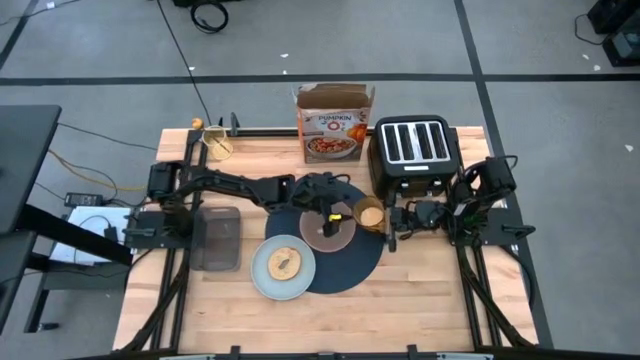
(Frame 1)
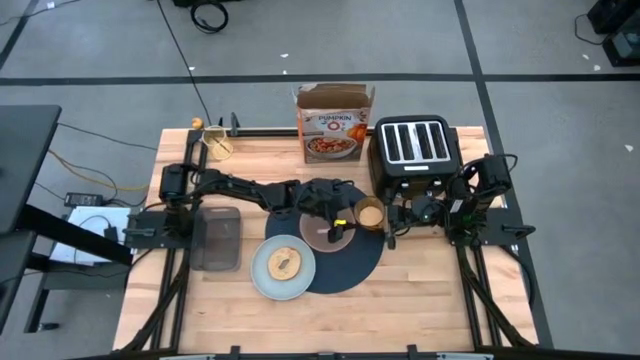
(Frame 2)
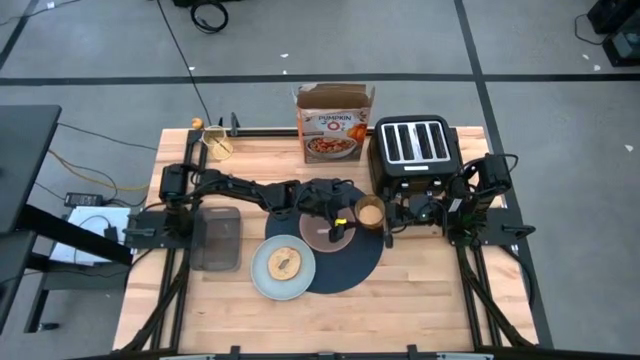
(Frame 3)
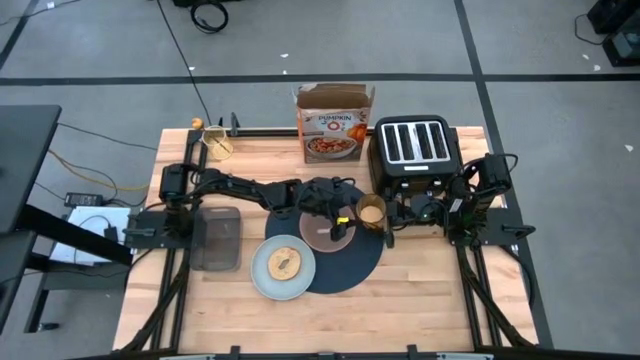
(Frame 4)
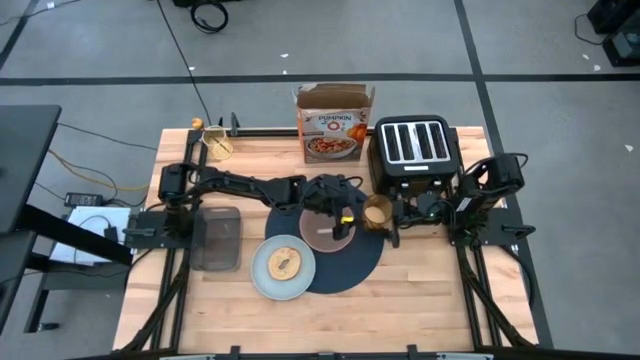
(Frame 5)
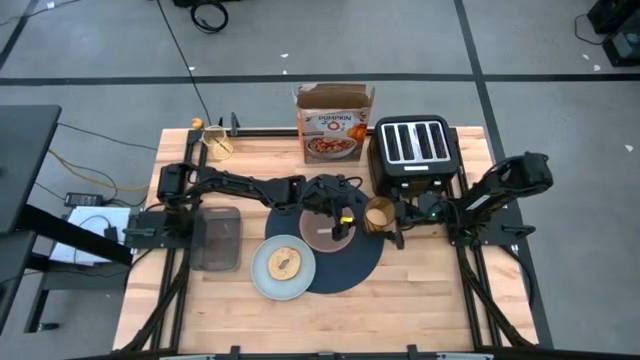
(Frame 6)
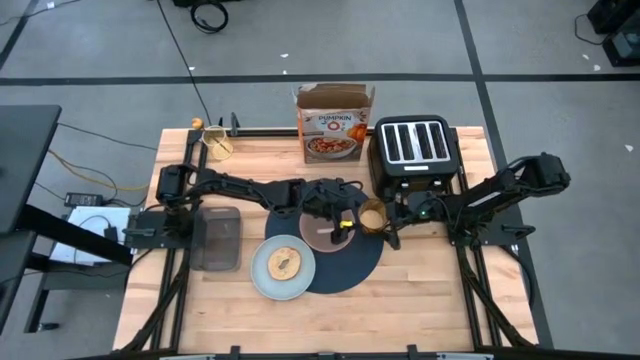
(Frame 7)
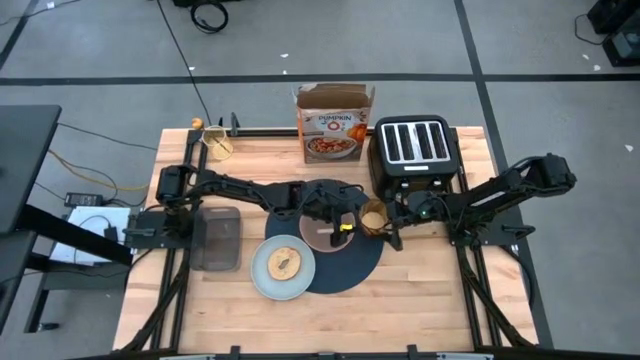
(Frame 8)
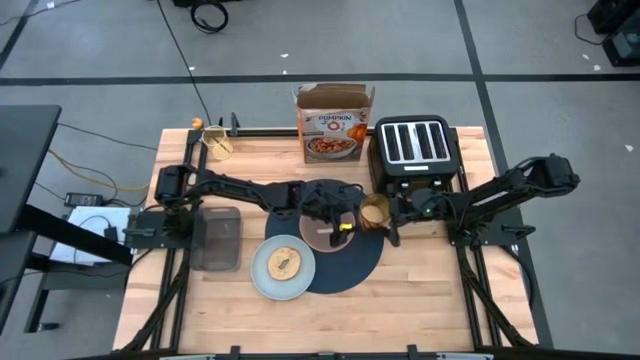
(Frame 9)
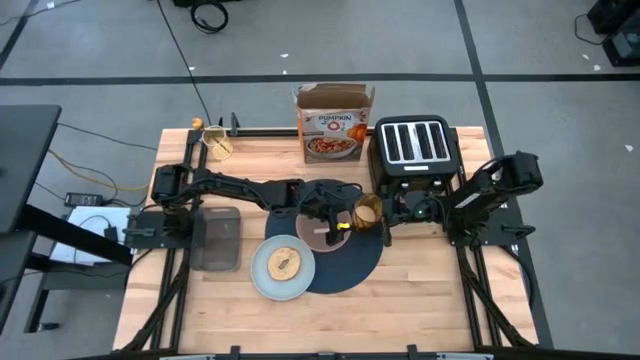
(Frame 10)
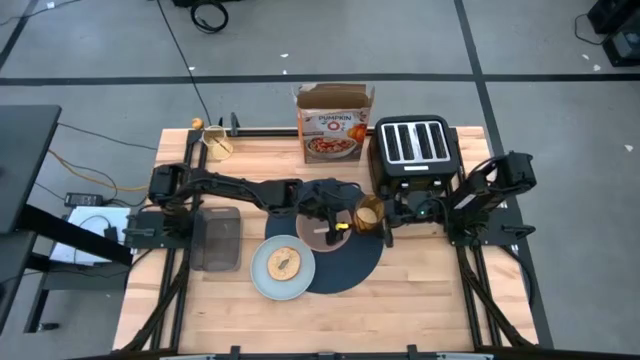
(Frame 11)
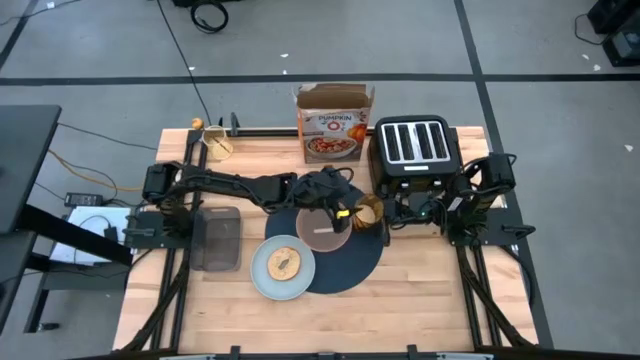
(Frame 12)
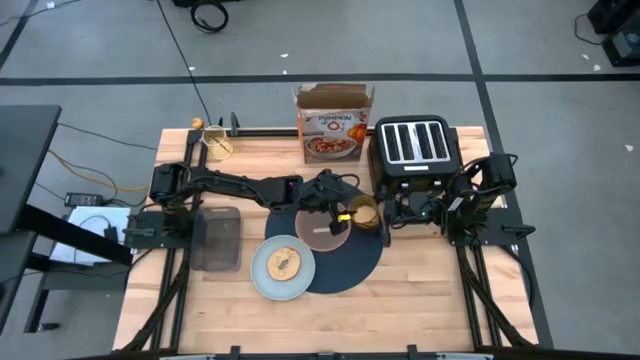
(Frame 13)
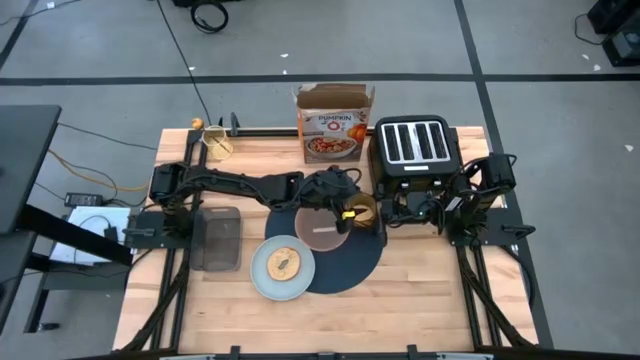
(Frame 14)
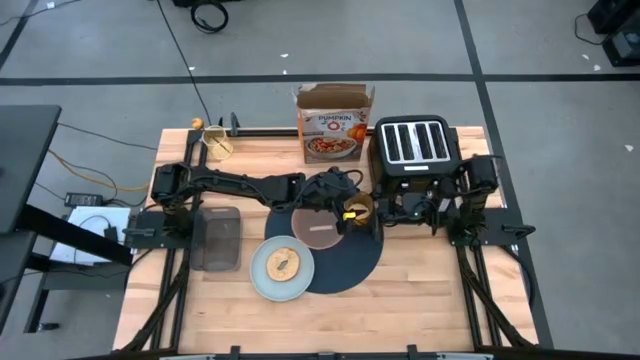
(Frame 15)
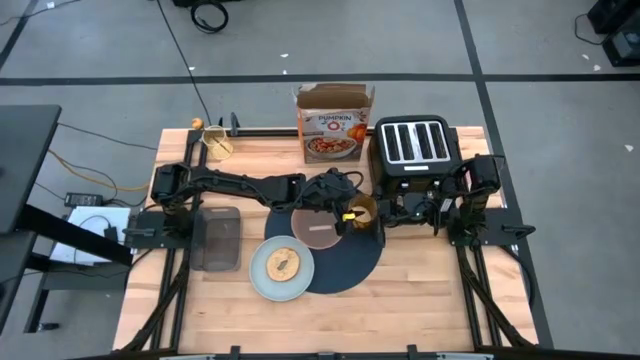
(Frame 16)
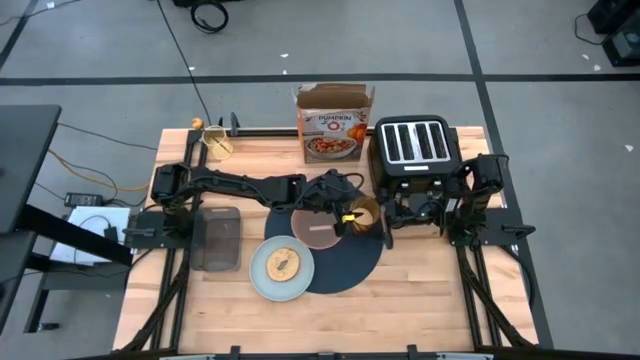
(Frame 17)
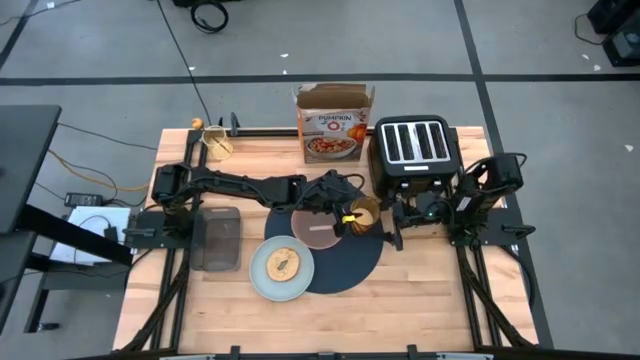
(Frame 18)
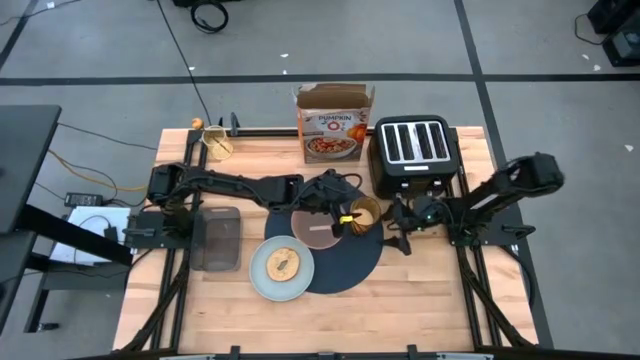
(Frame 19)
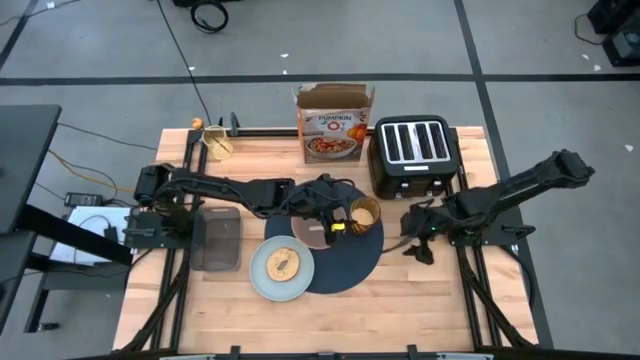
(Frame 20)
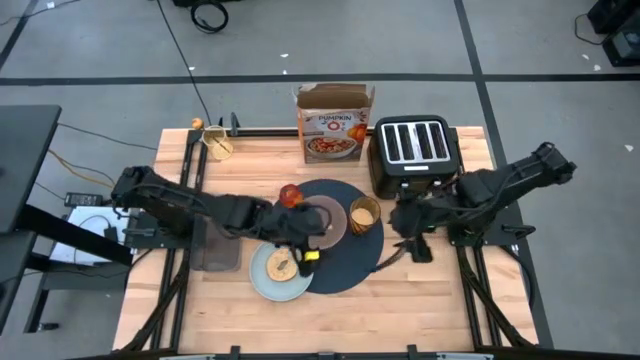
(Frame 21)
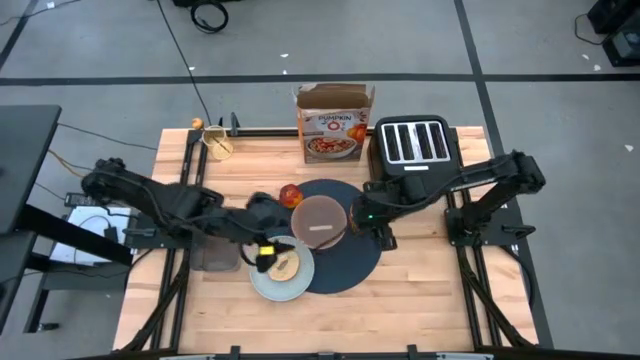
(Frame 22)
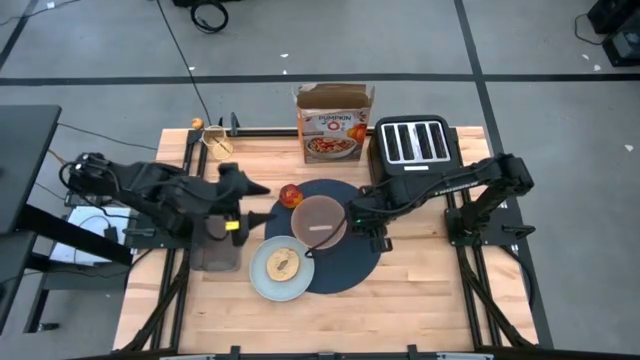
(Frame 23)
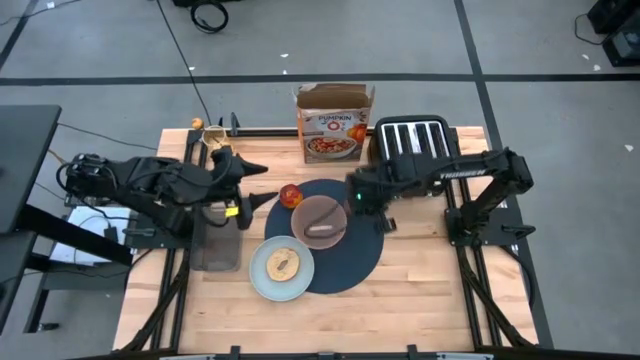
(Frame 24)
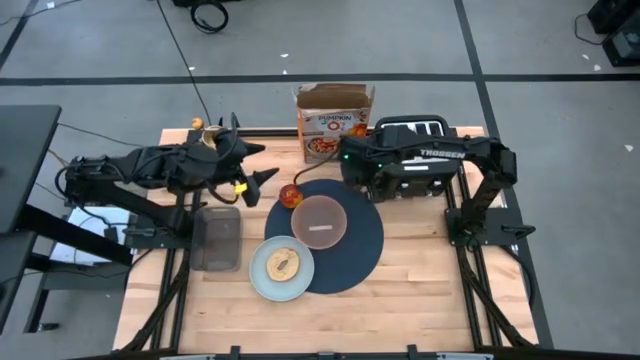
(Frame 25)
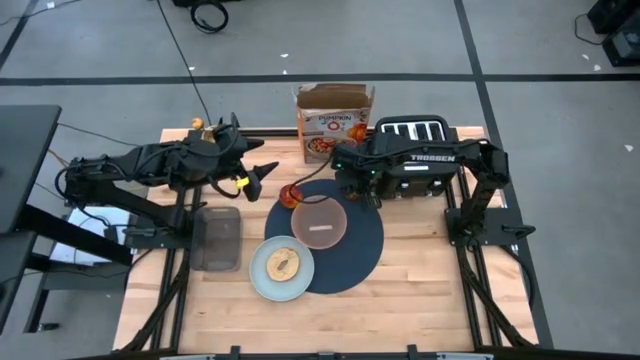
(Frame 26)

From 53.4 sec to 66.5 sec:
Task: Arrange a breakfast setting
Put the brown cup with rice on the dark blue tablemat to the to right of the orange bowl

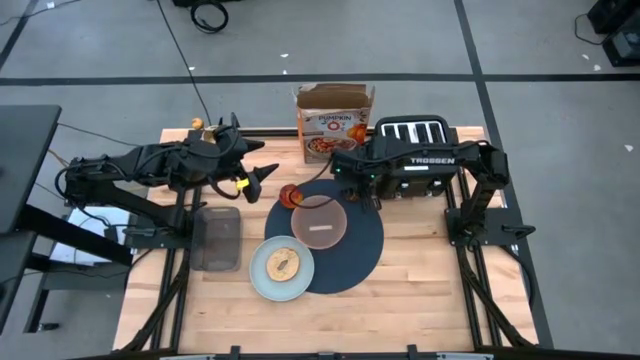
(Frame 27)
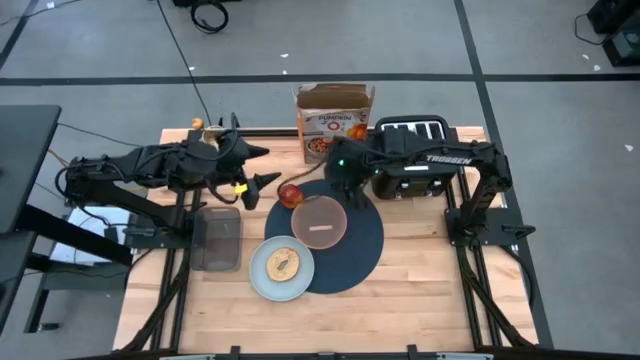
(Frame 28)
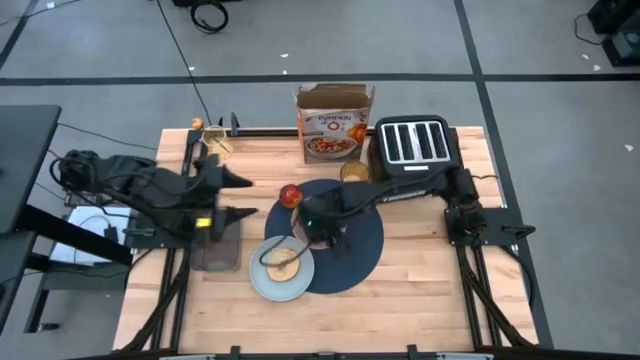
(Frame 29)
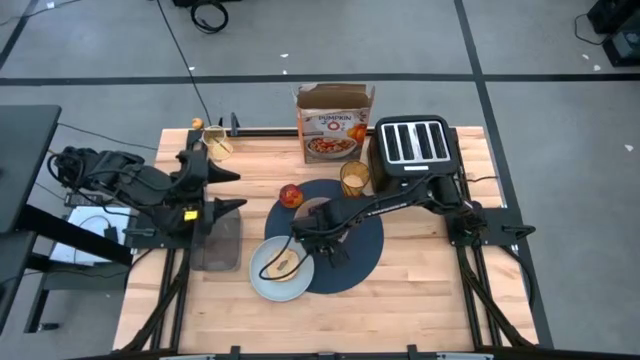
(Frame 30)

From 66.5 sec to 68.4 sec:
Adjust the orange bowl

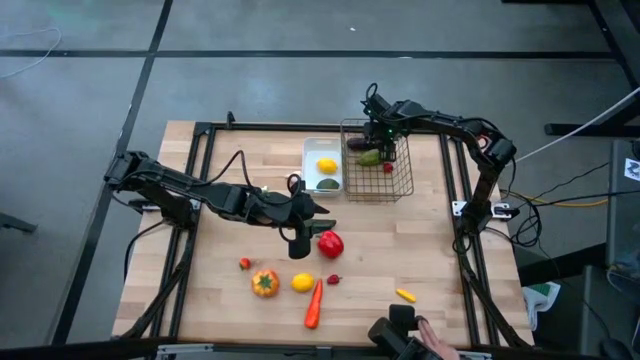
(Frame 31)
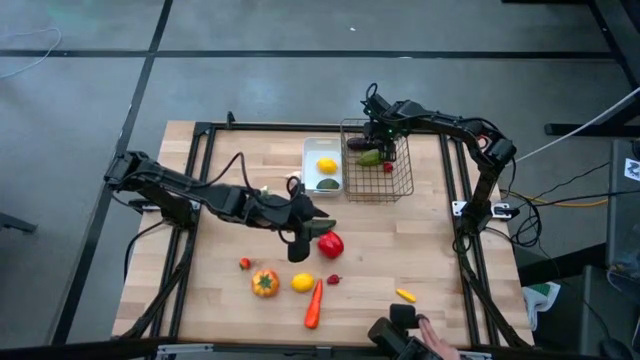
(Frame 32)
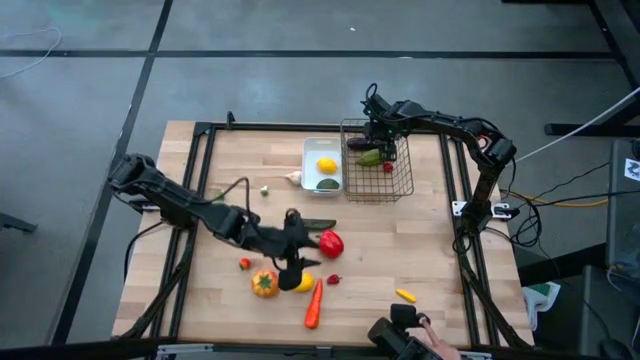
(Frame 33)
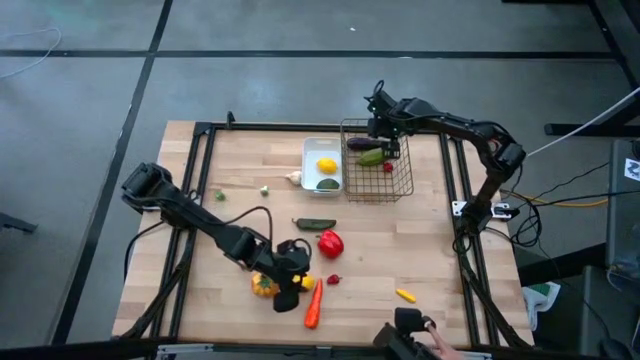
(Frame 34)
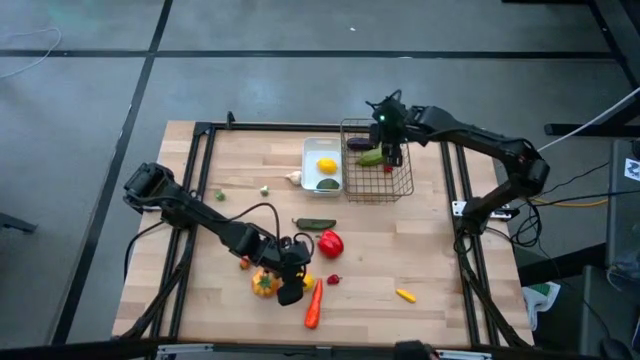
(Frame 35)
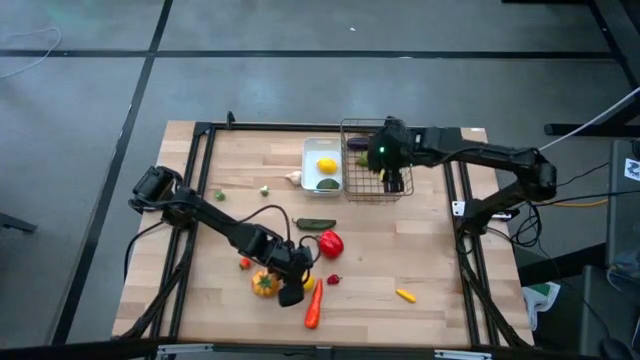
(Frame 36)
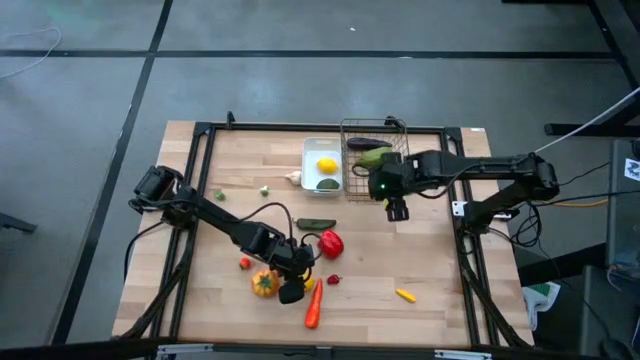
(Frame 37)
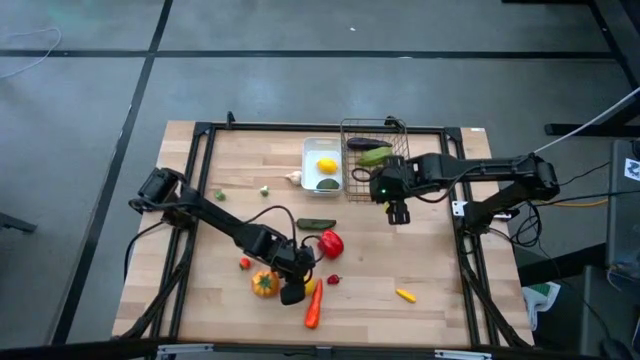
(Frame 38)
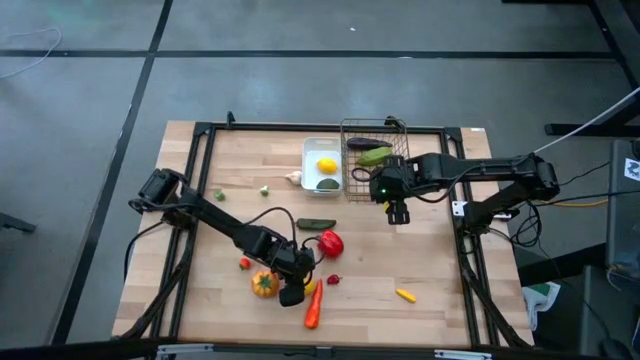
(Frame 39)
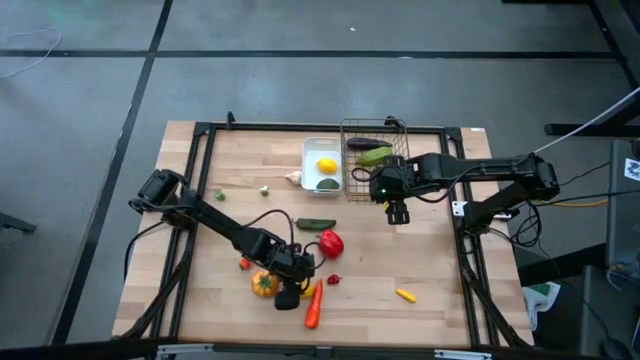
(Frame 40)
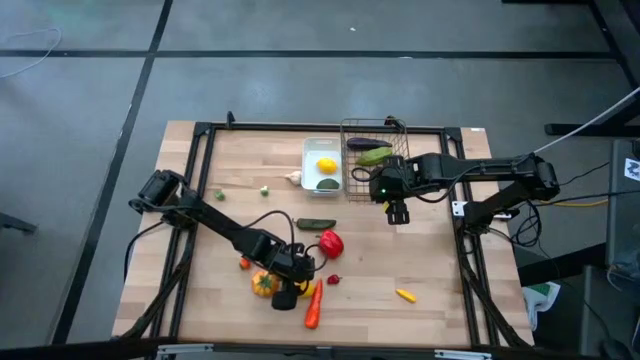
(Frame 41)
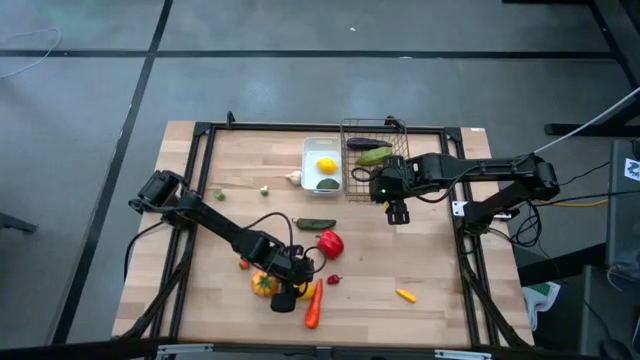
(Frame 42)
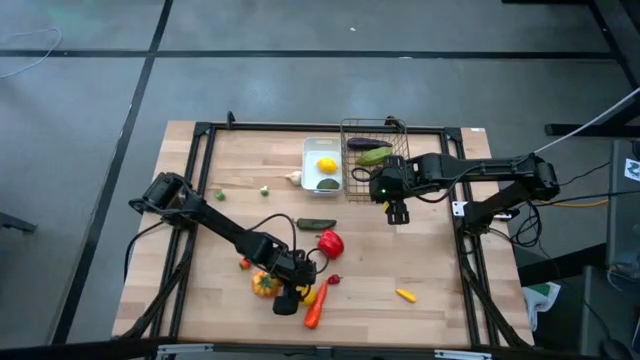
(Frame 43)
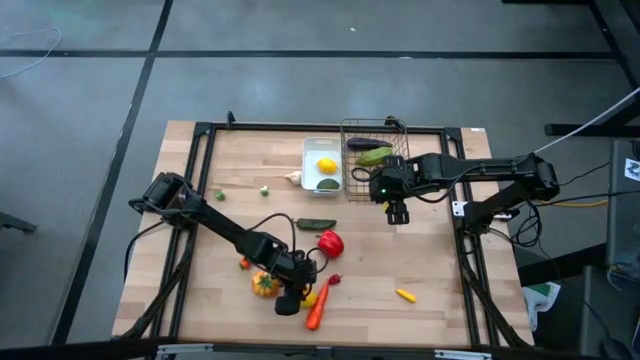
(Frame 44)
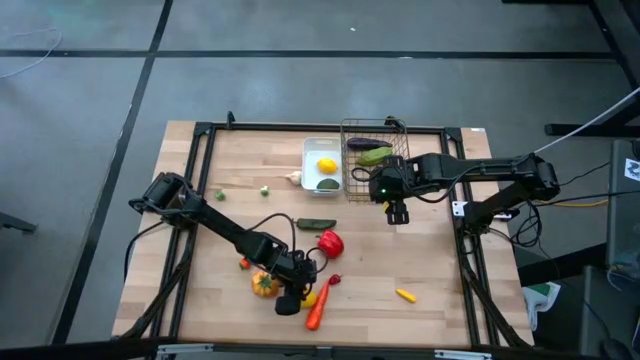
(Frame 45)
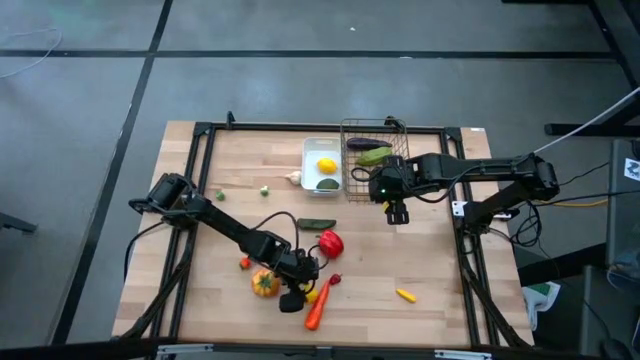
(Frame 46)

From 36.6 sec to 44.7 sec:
Task: Sort produce into baskets
Put the yellow lemon into the white bin
